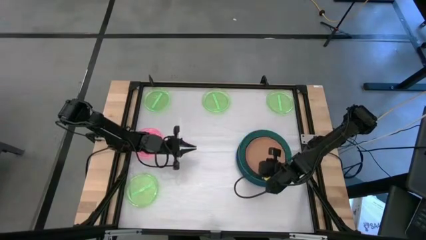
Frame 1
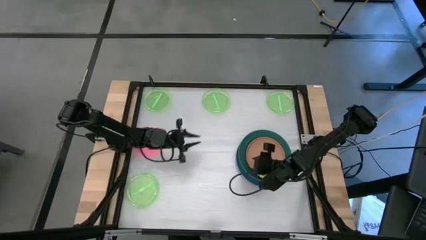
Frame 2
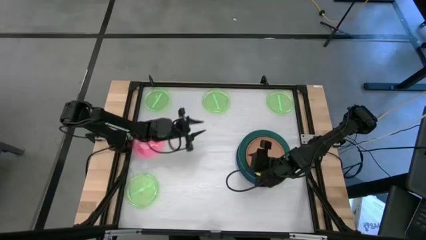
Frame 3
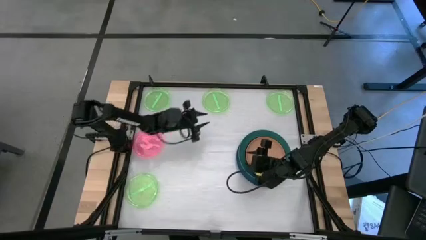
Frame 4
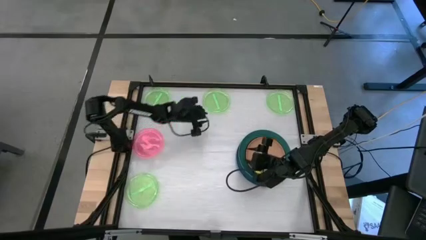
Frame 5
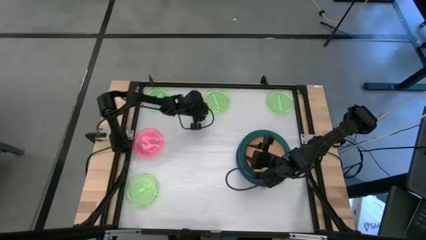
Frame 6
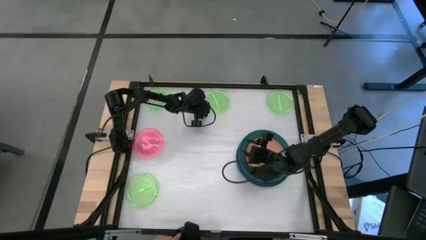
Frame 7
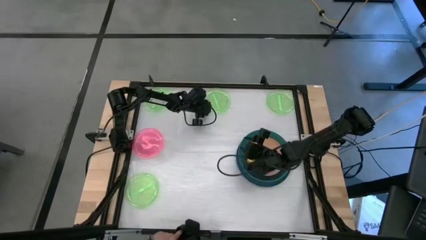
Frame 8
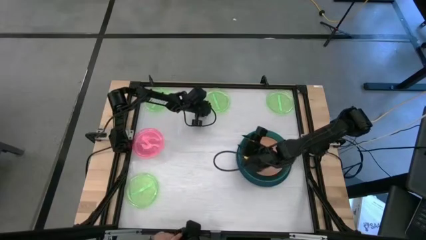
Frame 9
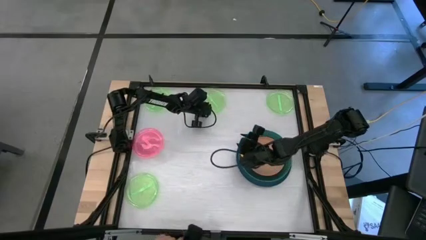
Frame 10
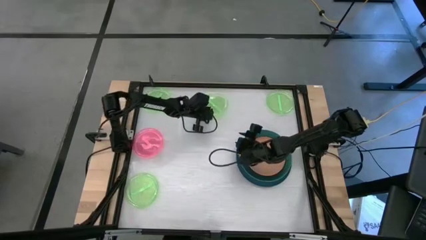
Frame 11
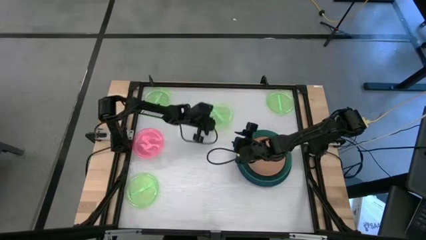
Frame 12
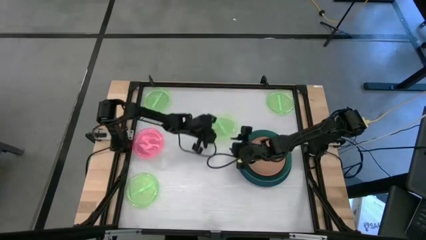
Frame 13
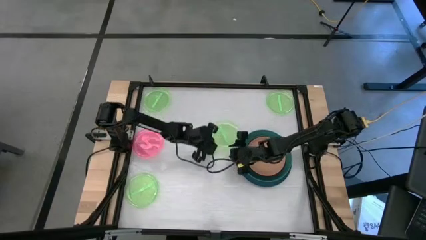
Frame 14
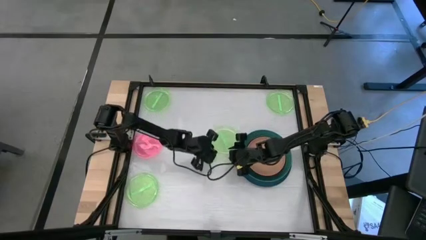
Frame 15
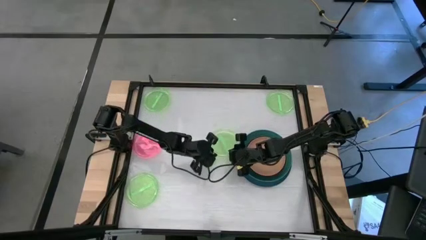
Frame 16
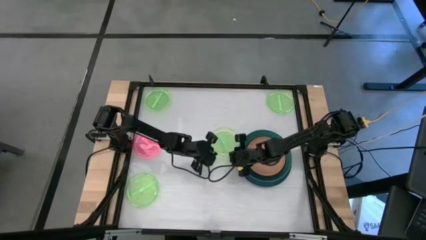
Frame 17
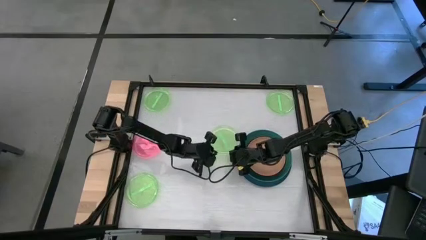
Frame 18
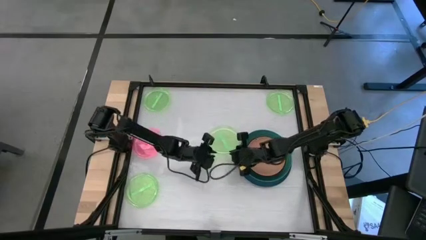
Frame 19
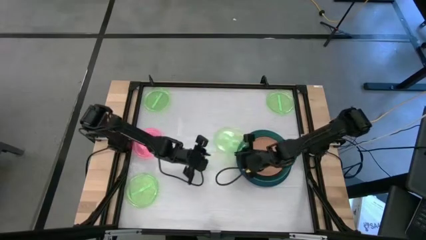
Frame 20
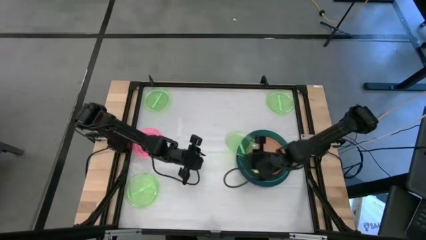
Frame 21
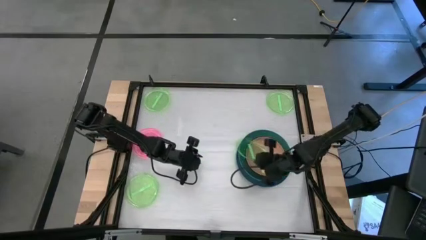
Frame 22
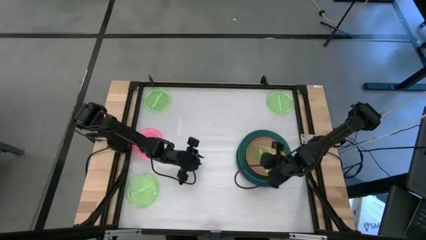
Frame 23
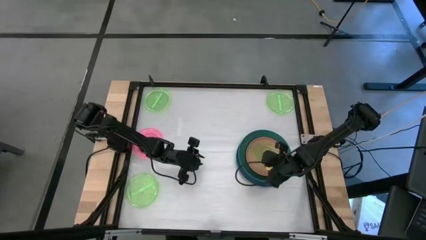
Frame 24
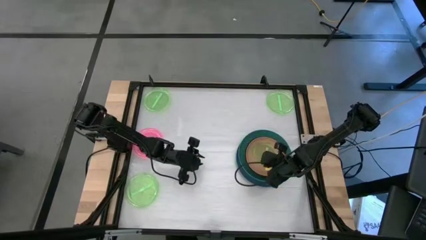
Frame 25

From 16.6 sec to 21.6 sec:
Task: Stack plastic plates
Stack the light green plate on top of the orange plate

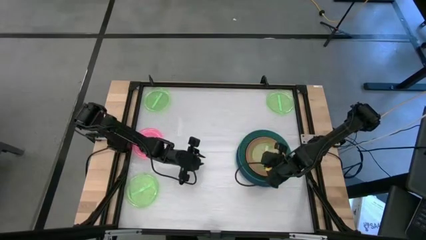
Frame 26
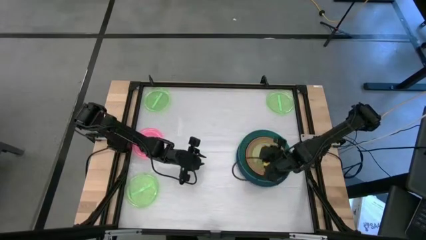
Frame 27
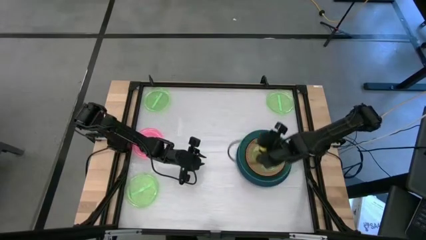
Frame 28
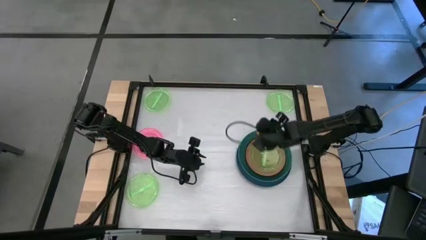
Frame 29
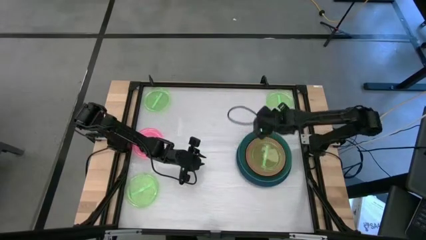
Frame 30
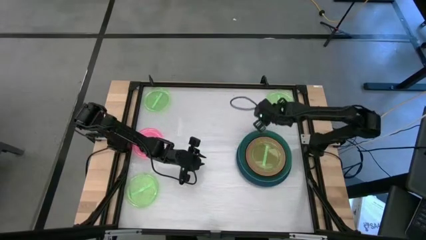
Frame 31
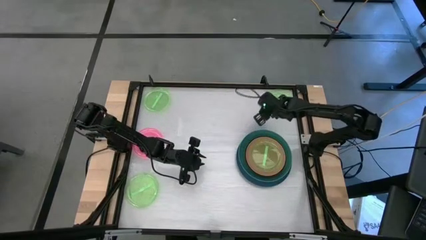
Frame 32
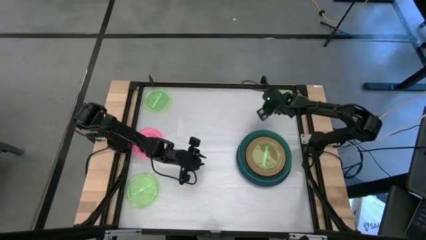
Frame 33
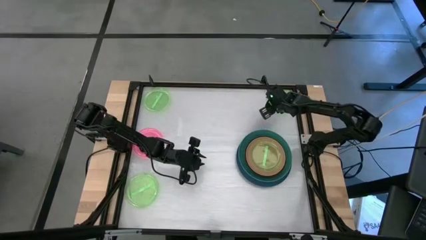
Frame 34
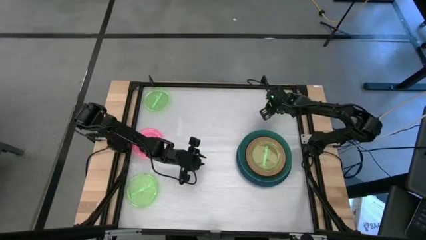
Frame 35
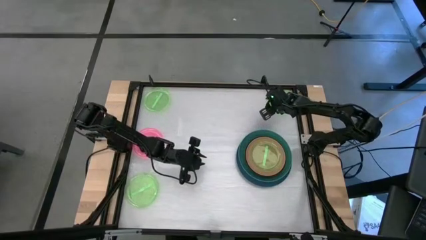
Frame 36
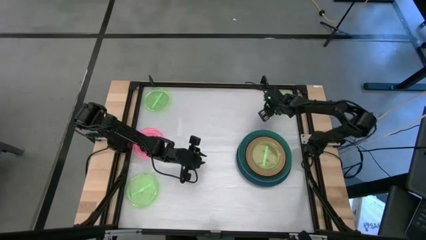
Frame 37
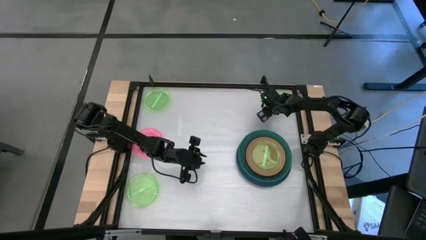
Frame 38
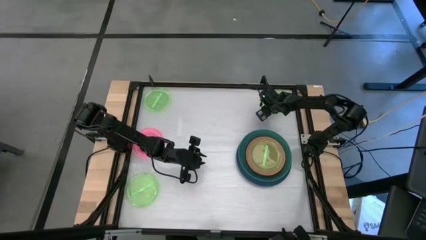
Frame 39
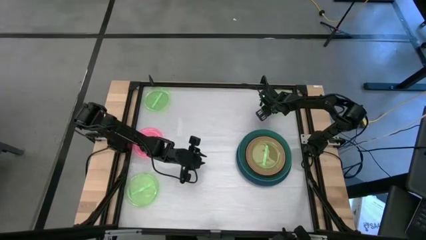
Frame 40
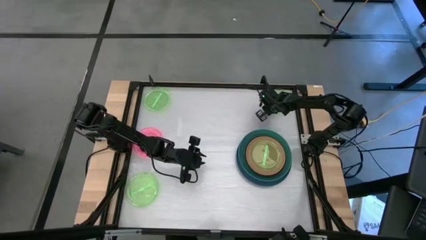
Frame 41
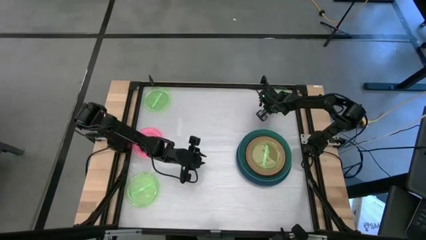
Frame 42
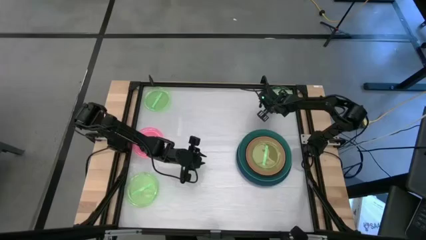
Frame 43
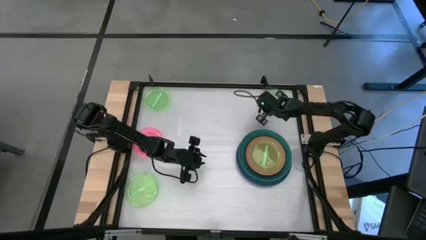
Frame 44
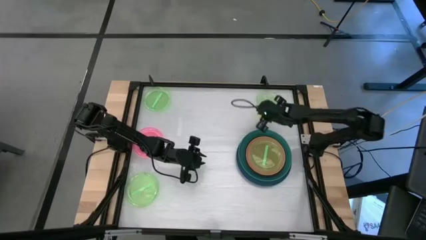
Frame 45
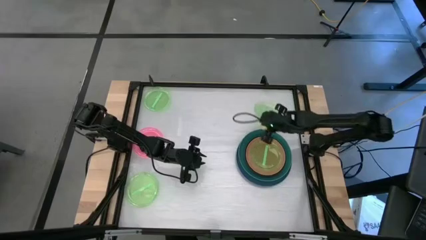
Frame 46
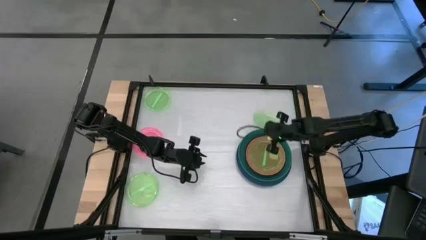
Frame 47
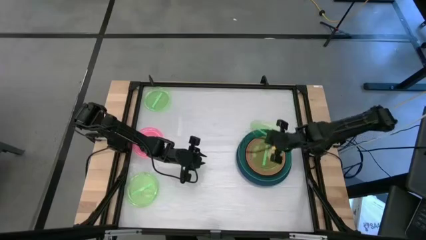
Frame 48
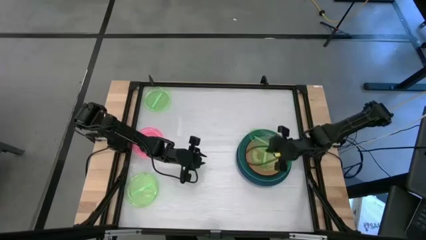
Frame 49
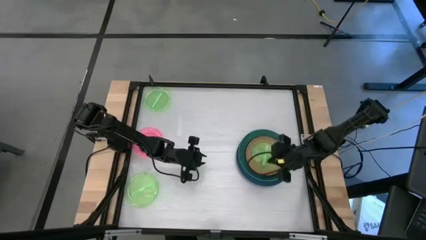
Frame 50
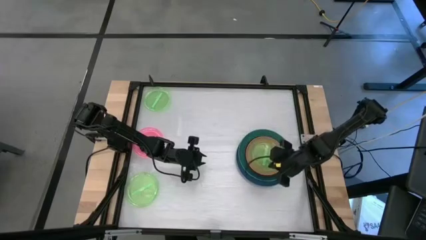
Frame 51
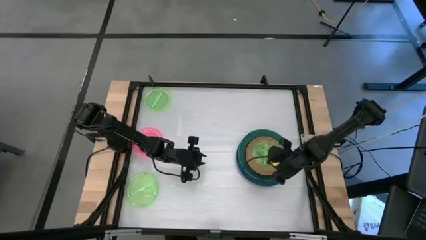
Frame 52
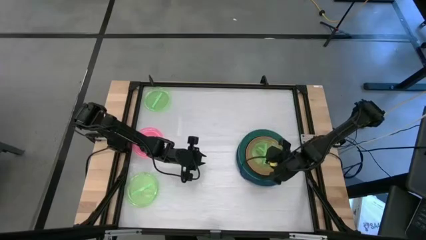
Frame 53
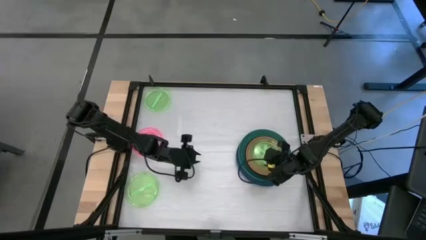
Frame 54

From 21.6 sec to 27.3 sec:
Stack the light green plate on top of the light plate

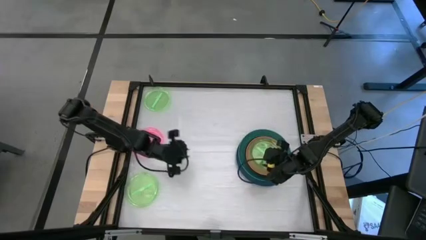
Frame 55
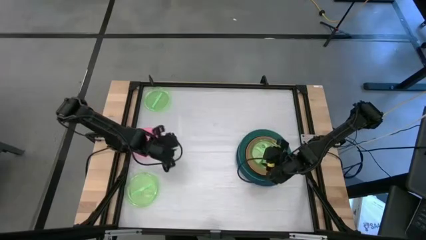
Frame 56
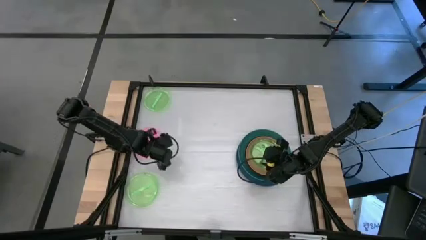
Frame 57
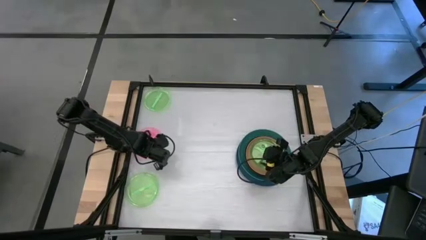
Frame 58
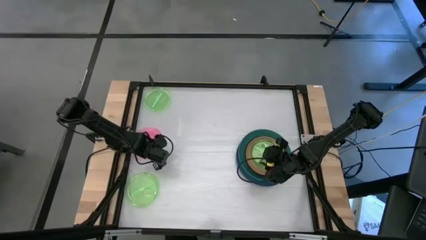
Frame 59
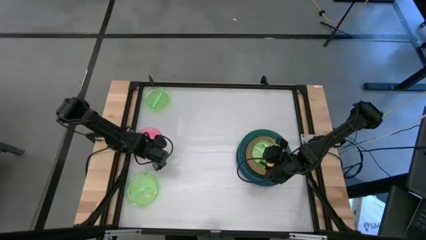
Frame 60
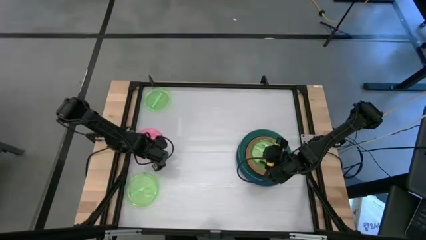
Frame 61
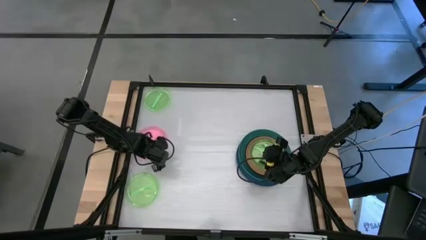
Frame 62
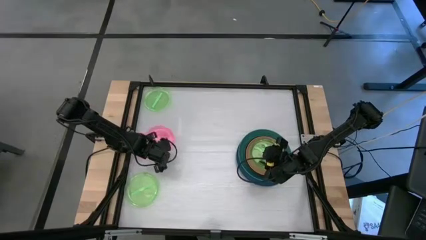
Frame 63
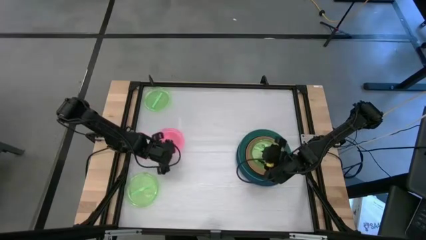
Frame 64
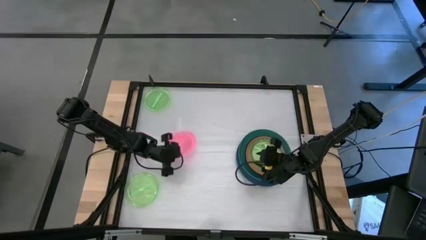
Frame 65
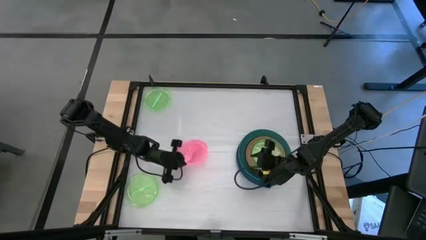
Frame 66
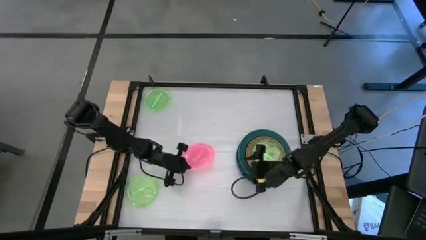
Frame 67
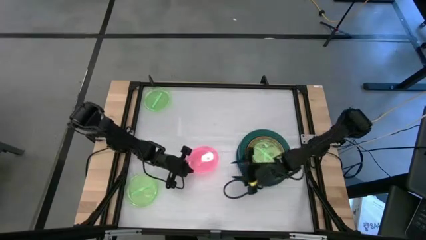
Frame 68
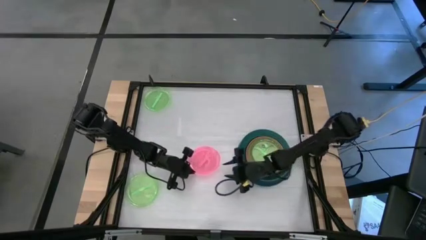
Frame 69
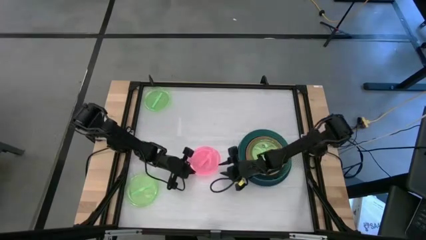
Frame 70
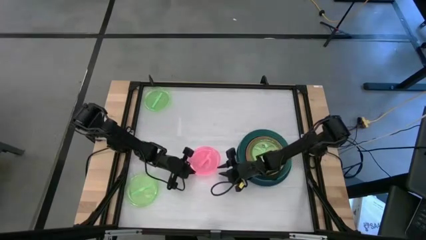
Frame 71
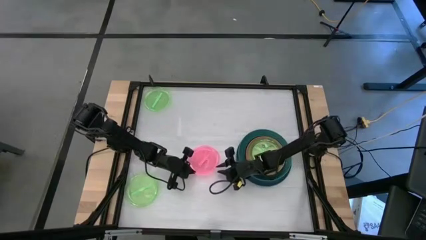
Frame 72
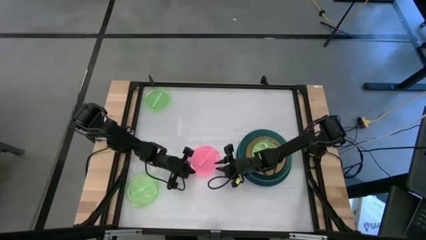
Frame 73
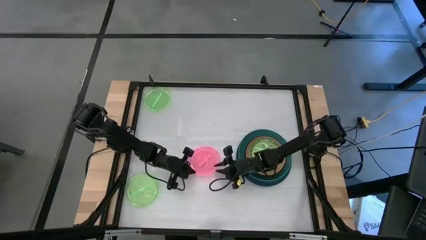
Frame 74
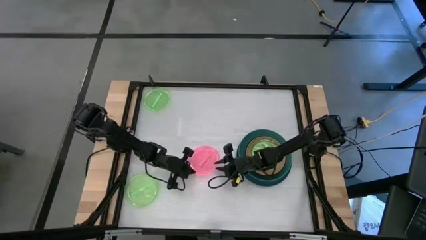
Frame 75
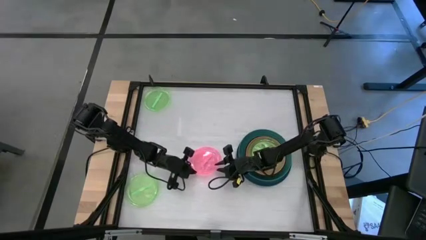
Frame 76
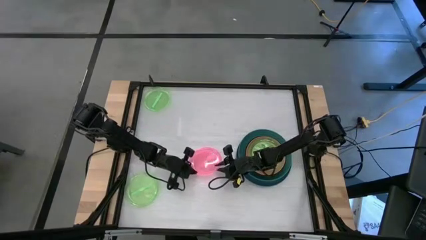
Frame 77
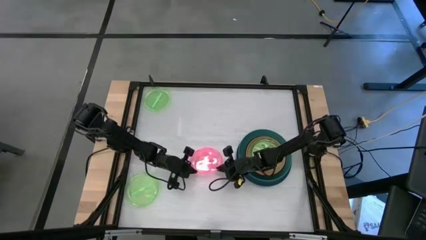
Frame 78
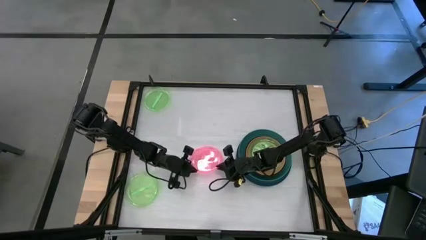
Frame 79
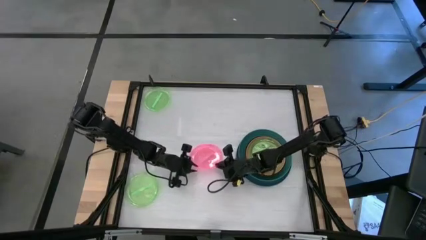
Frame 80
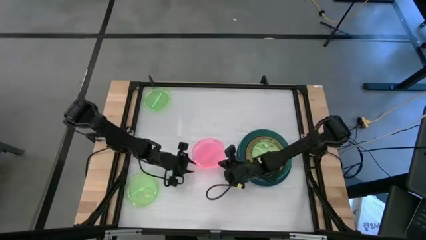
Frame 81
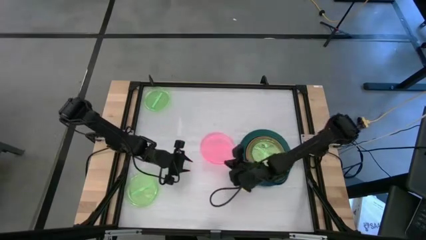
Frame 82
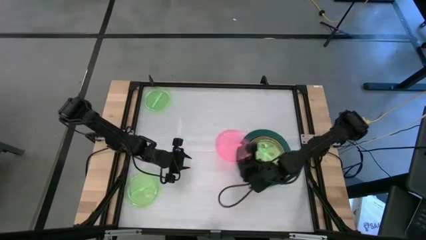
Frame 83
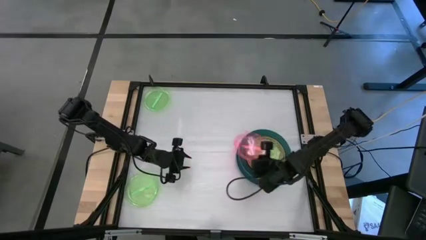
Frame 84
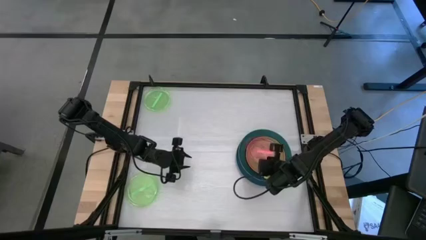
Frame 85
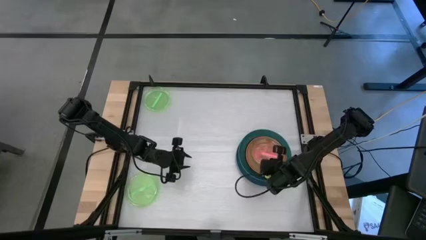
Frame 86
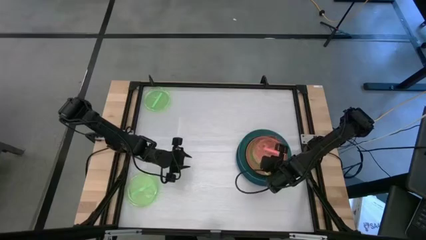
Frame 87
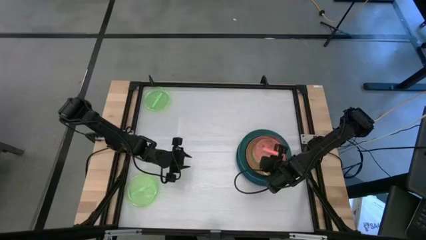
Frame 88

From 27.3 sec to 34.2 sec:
Stack the pink plate on top of the light green plate
